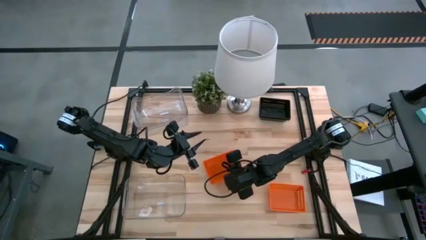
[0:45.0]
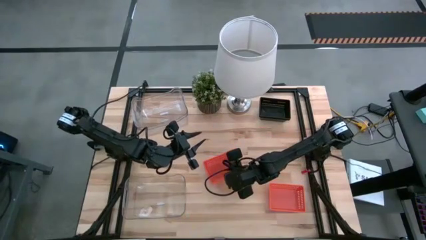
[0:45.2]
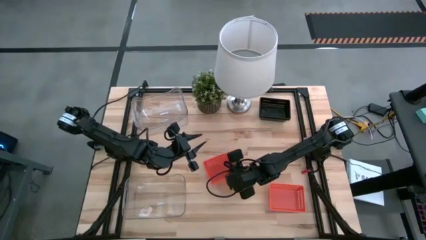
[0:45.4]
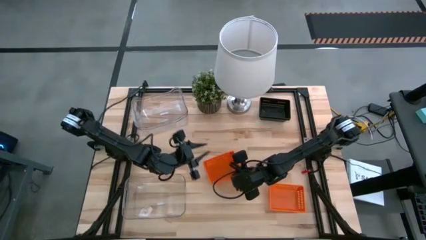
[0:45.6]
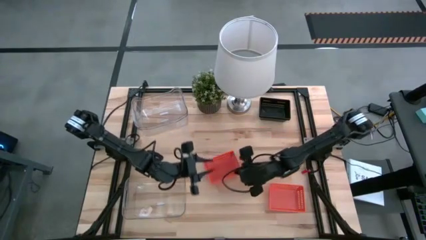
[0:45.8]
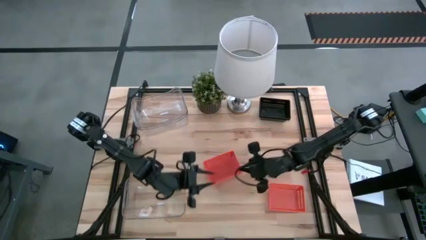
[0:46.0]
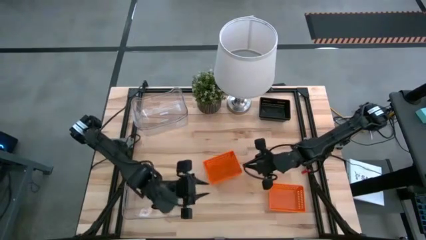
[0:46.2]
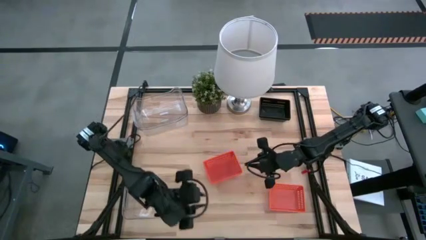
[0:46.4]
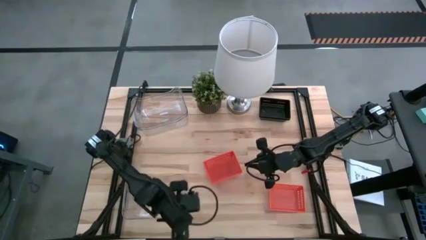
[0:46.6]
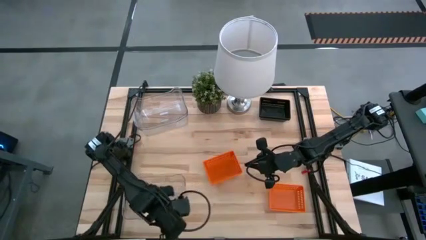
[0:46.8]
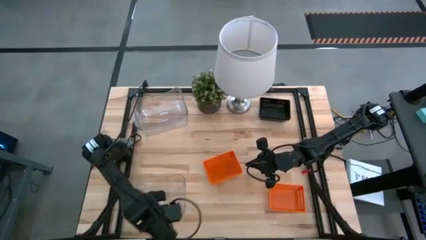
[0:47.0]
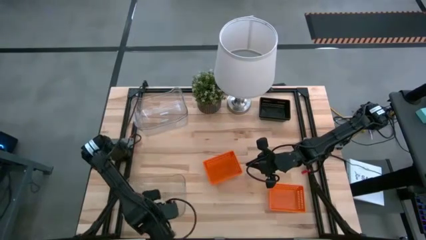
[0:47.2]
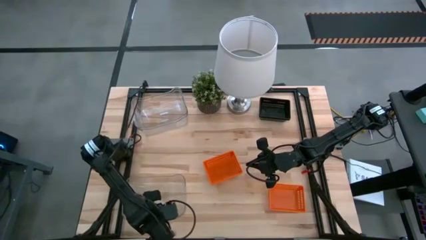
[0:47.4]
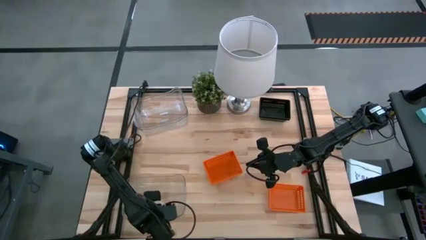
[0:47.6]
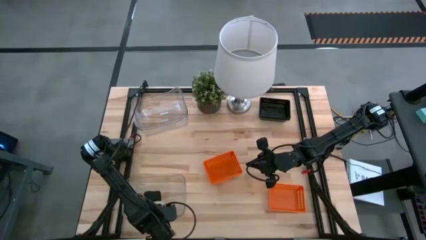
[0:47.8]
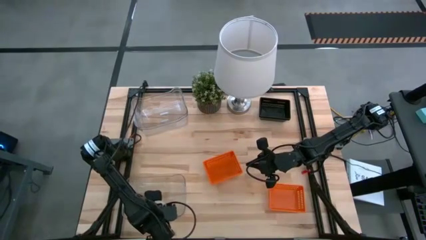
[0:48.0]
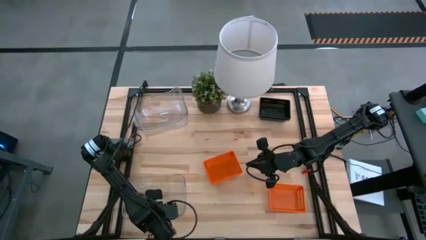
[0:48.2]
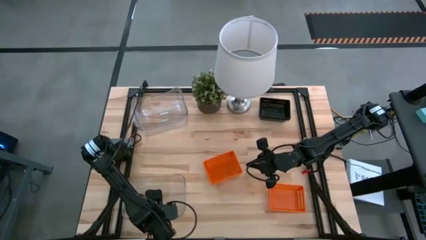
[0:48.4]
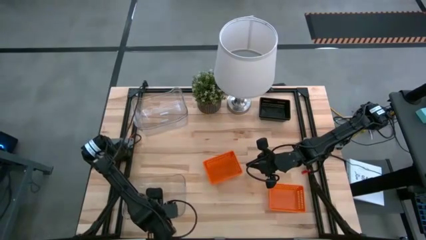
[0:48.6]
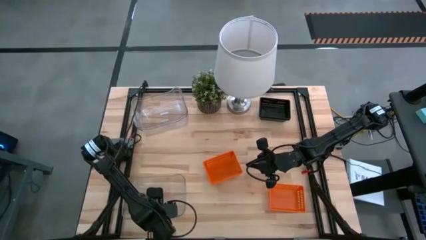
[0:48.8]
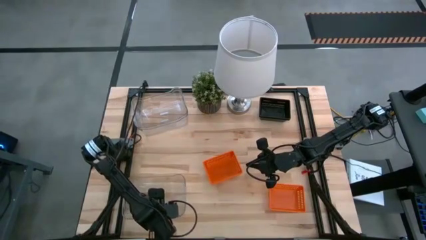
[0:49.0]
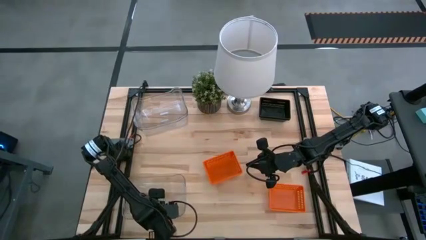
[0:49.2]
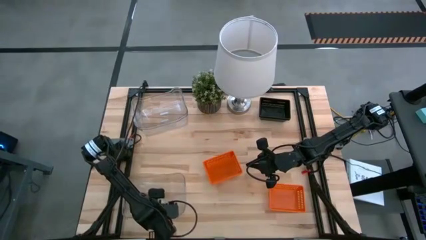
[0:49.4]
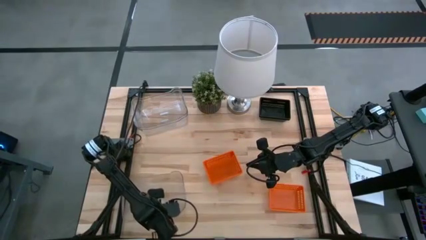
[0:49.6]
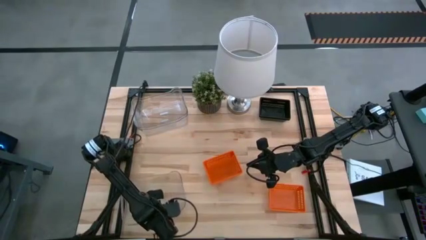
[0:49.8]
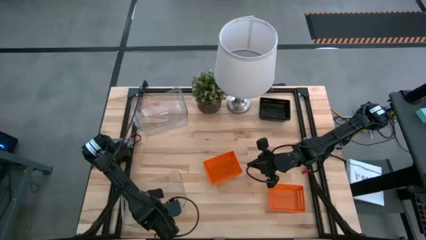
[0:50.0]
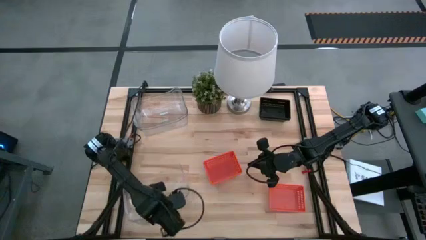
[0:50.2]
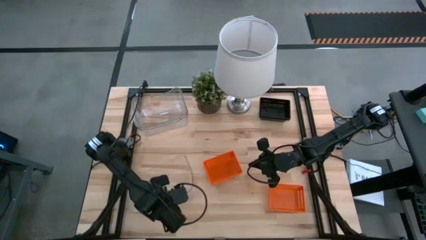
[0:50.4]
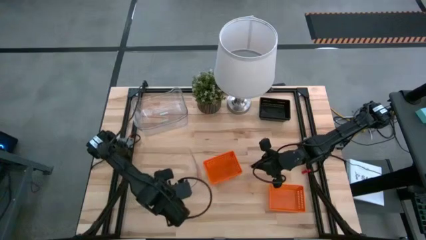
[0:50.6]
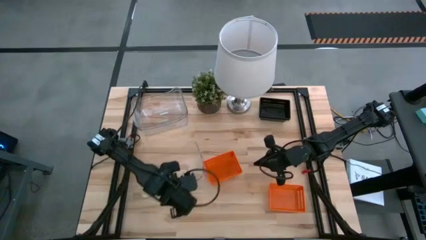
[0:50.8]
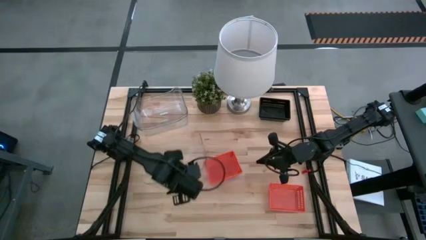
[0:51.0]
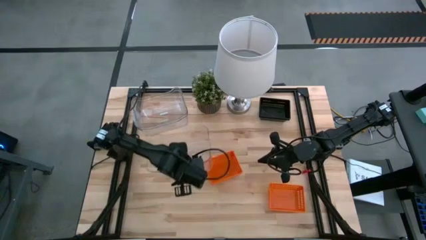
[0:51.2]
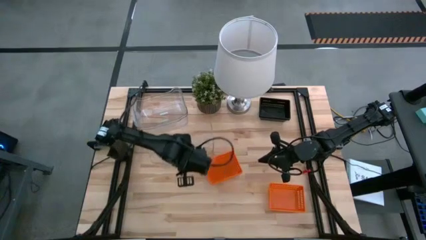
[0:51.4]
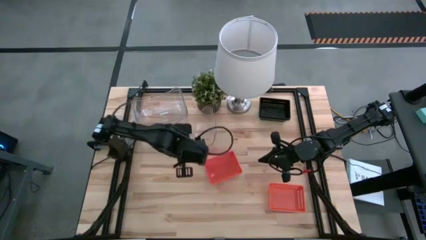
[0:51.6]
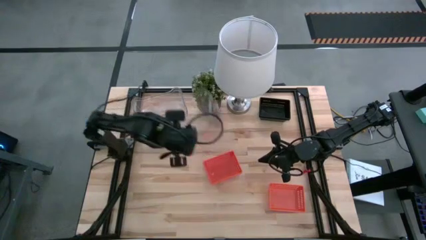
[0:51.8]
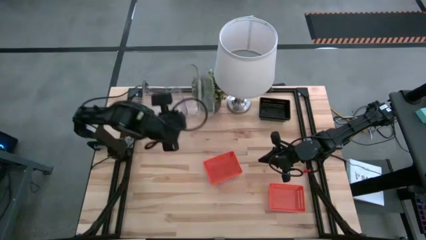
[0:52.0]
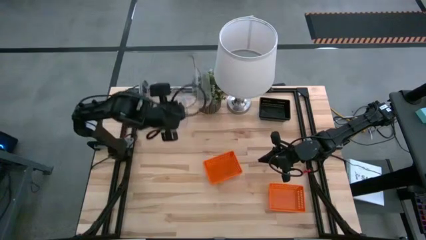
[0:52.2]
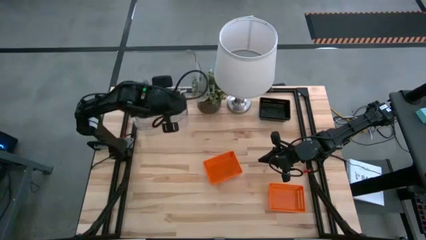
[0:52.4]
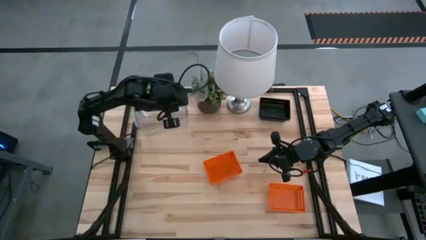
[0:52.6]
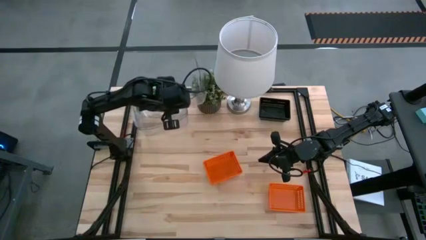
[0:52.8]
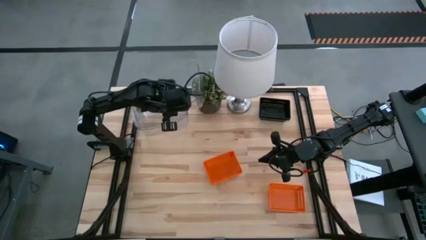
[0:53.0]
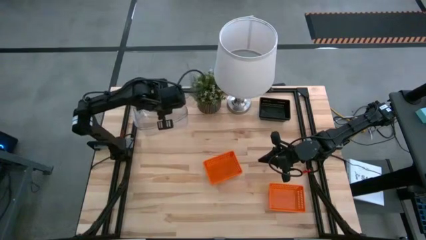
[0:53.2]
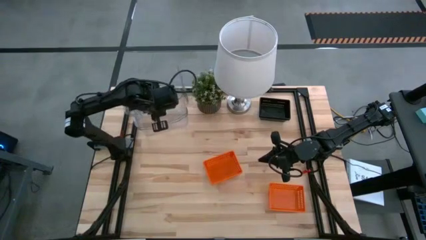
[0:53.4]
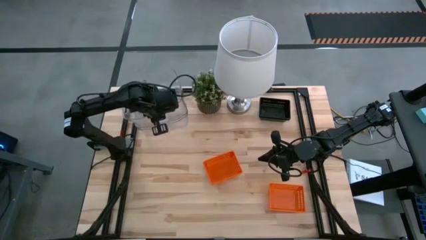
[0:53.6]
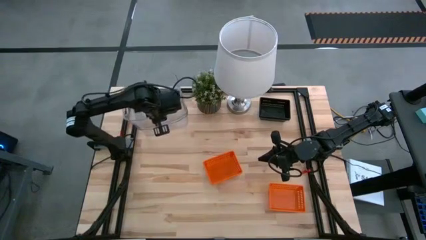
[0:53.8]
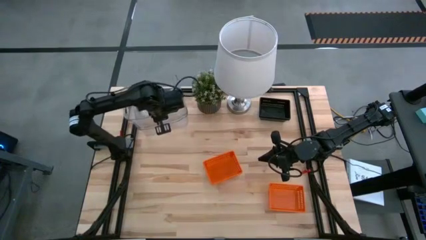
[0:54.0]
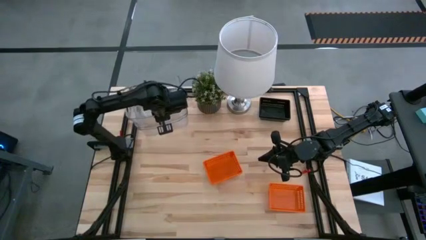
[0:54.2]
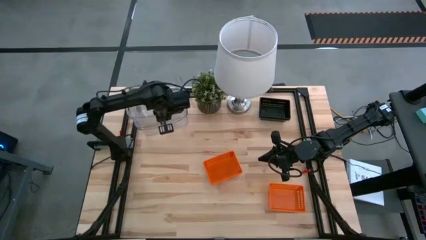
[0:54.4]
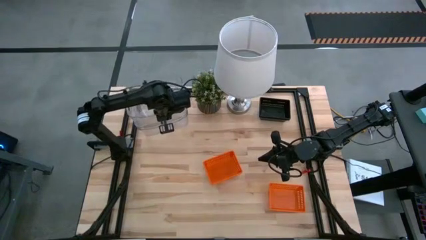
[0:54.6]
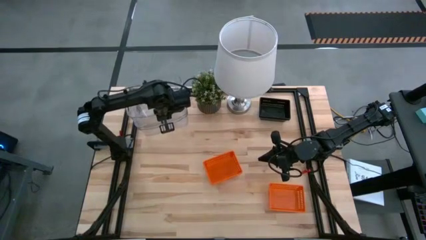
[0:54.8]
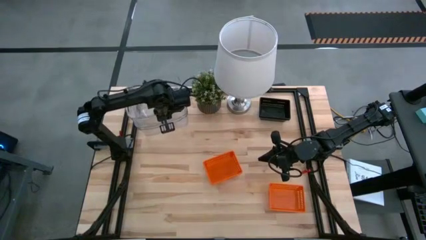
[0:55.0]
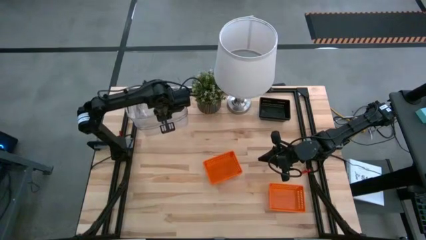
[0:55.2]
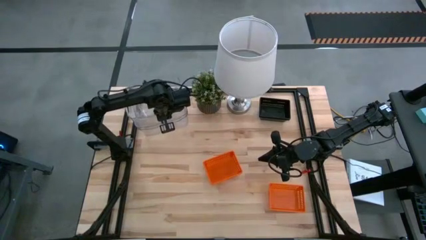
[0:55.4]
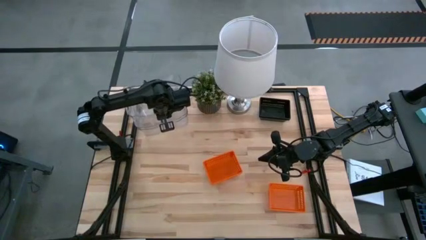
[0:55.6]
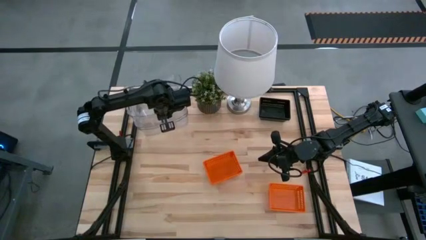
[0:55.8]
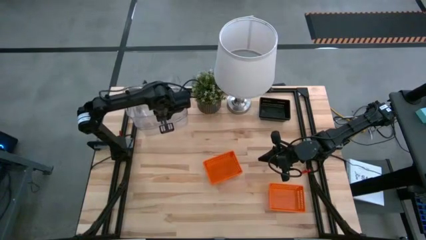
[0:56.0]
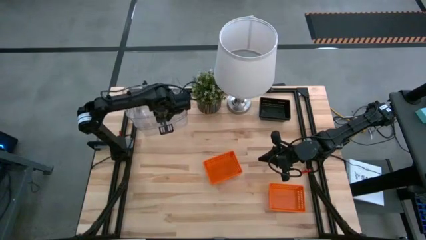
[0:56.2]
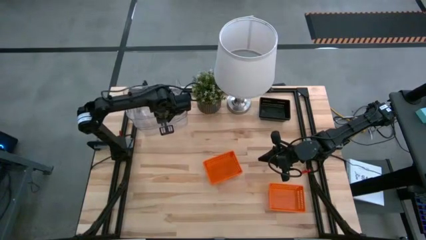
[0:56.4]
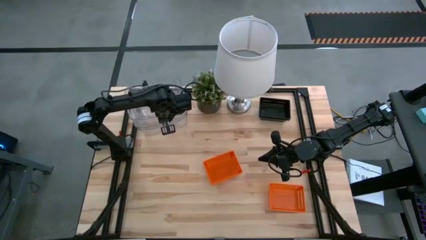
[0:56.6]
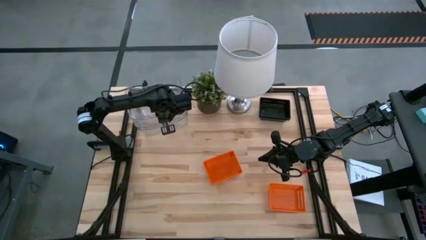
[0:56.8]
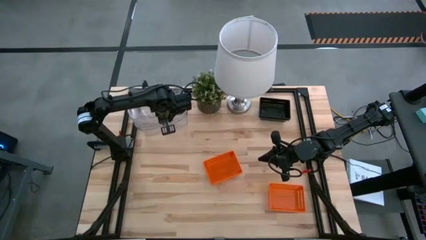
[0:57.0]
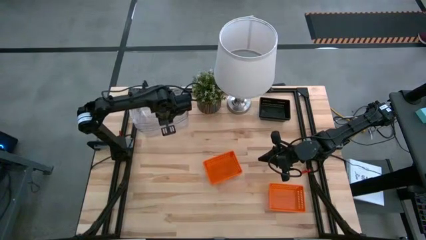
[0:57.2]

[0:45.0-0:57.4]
Stack the transparent bin into the top of the stacked transparent bins

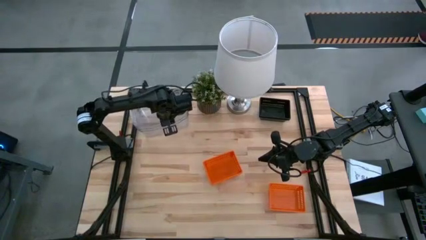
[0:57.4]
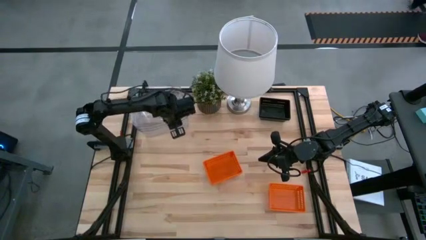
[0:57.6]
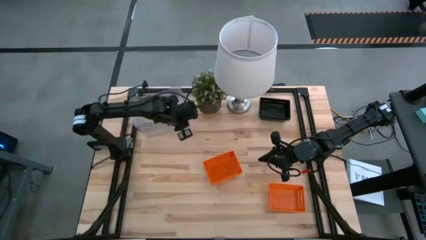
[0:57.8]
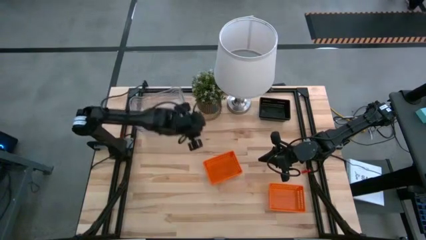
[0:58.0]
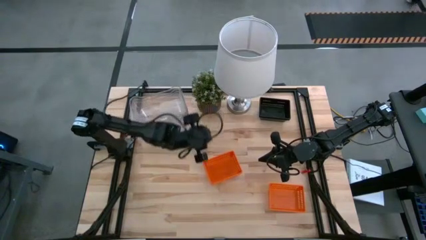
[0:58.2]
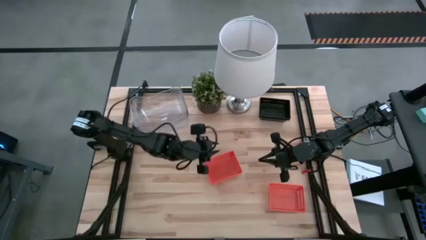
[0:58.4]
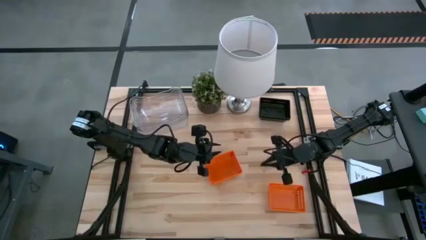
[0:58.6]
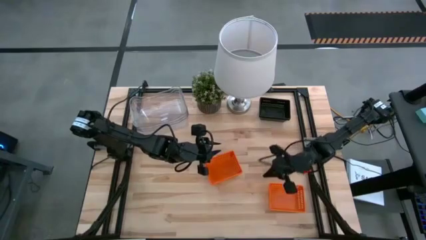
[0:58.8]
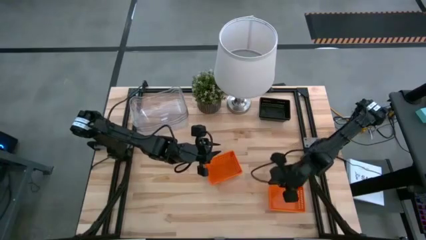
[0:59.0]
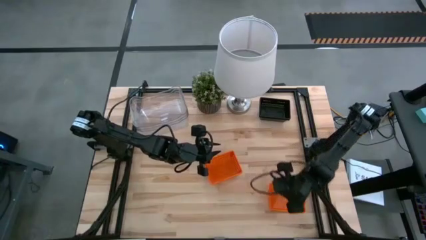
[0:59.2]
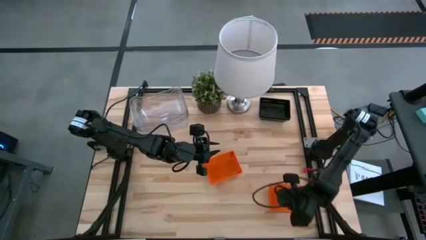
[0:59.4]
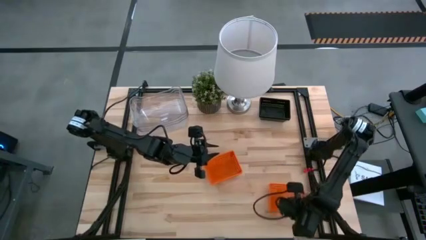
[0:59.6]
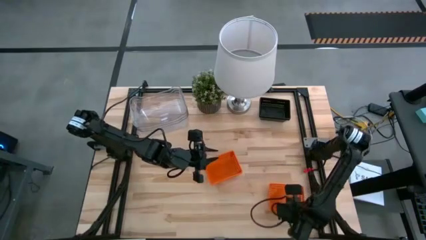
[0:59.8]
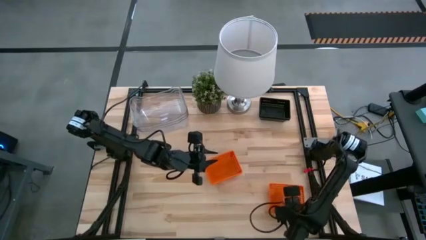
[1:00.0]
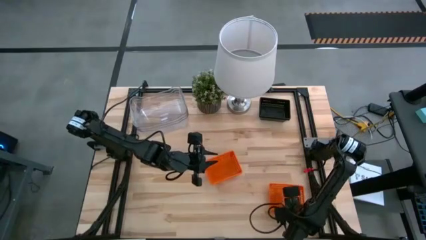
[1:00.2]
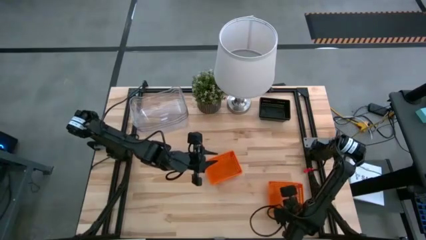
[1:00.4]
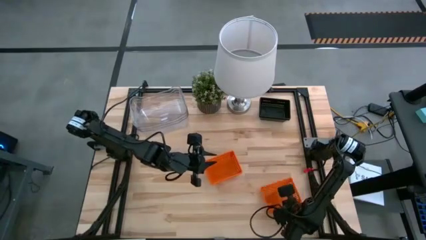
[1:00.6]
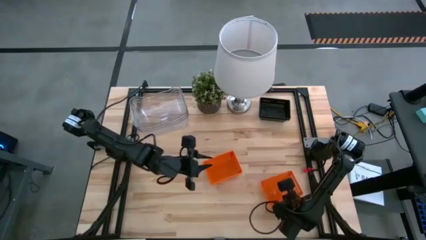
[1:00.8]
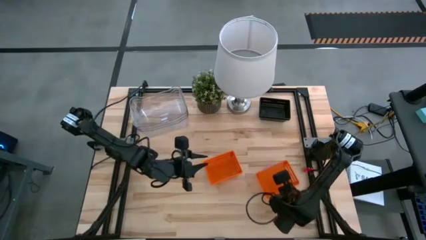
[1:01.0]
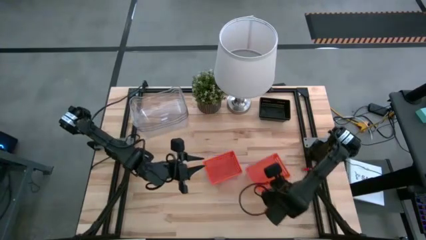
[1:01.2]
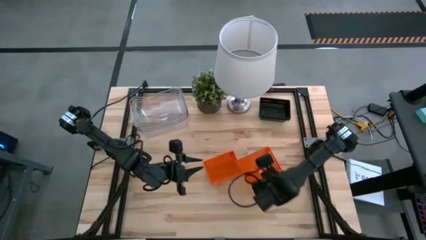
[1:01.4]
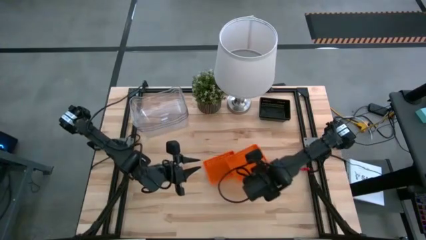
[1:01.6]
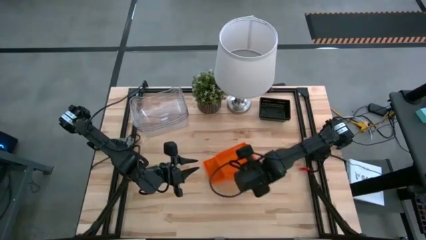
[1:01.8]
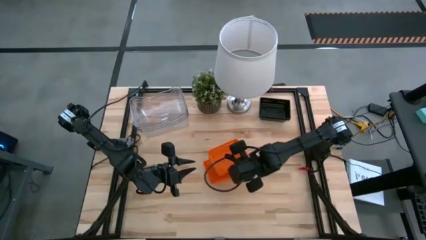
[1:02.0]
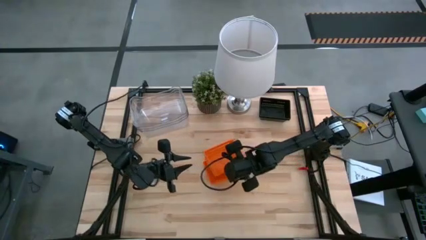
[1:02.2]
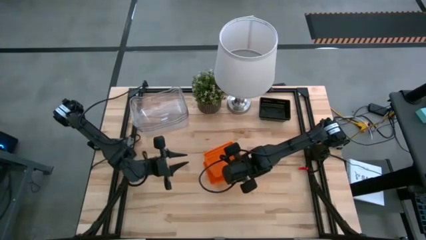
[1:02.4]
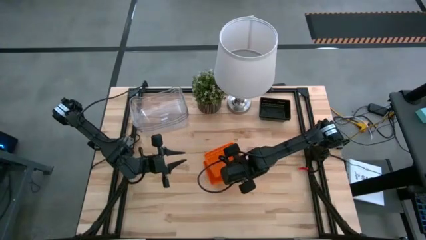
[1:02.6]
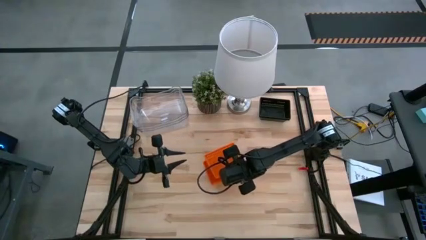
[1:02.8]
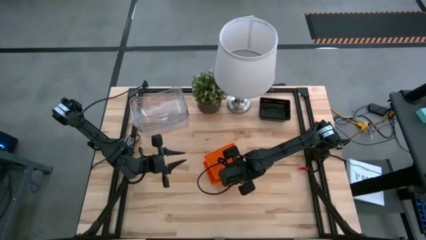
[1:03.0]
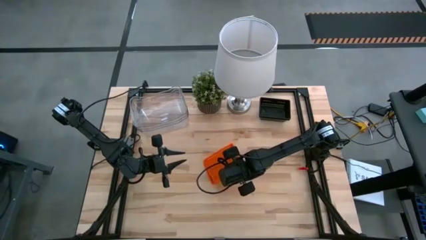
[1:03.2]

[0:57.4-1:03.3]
Stack the orange bin into the top of the stacked orange bins
